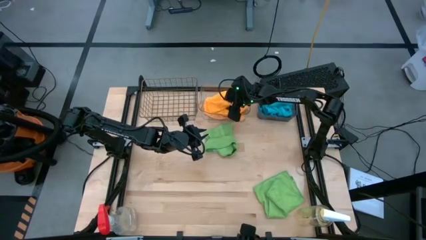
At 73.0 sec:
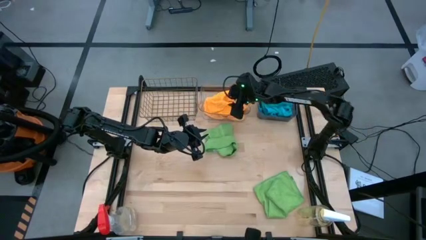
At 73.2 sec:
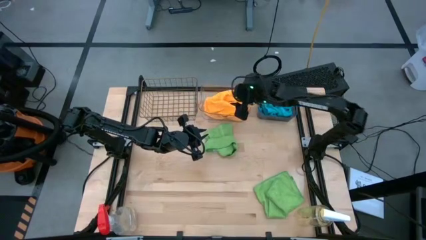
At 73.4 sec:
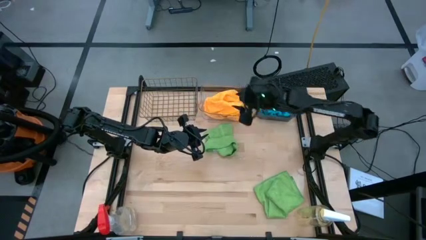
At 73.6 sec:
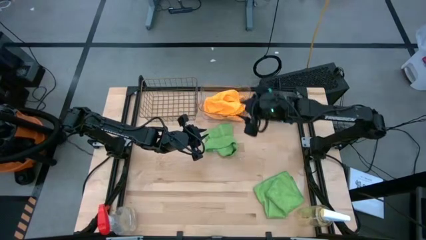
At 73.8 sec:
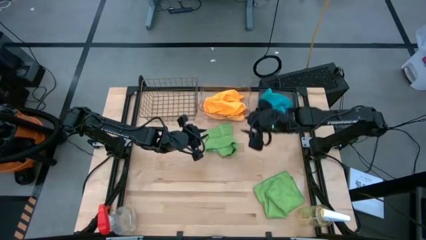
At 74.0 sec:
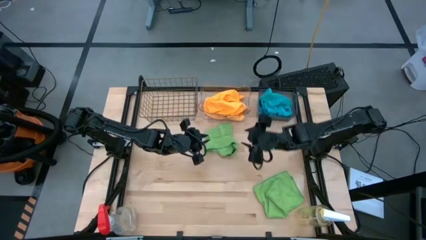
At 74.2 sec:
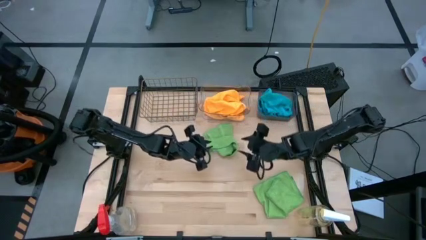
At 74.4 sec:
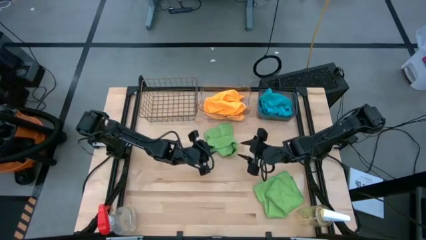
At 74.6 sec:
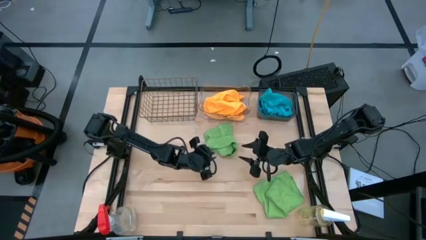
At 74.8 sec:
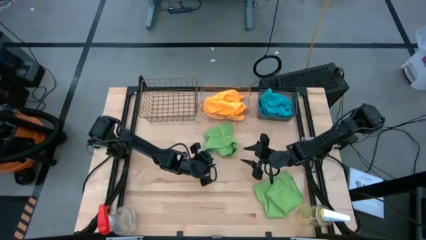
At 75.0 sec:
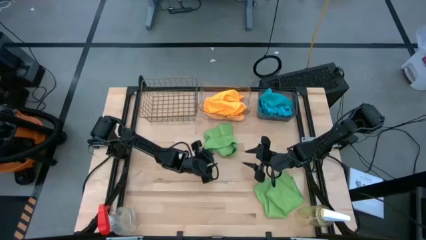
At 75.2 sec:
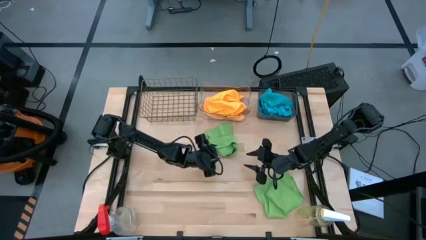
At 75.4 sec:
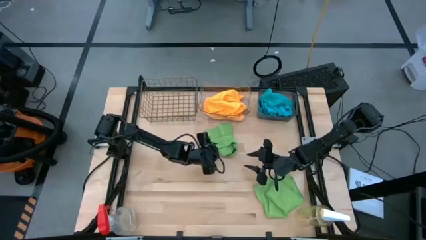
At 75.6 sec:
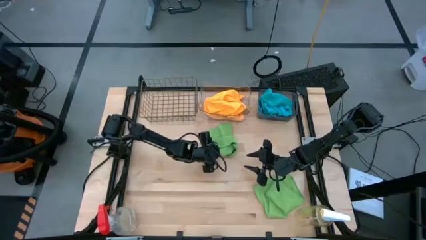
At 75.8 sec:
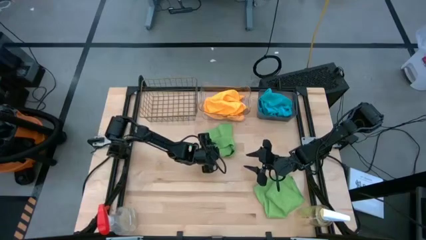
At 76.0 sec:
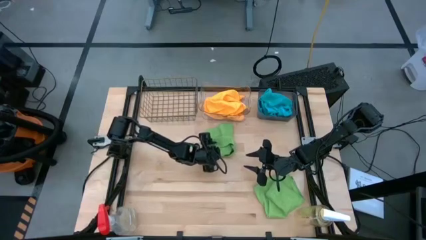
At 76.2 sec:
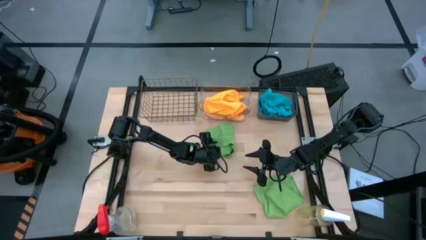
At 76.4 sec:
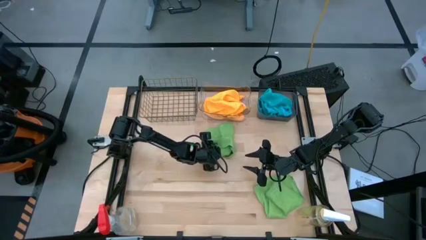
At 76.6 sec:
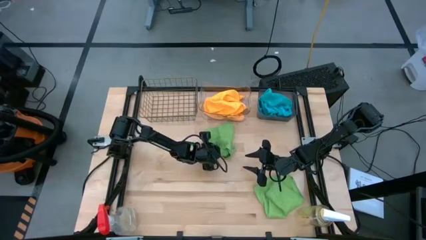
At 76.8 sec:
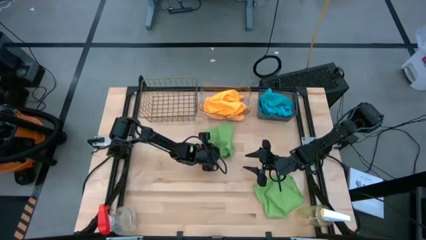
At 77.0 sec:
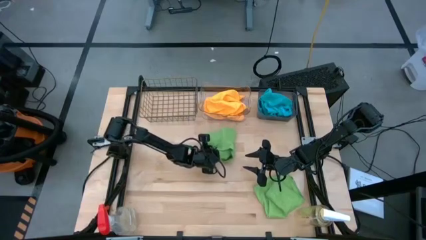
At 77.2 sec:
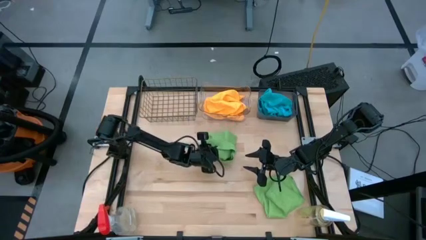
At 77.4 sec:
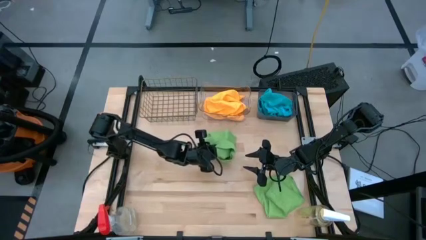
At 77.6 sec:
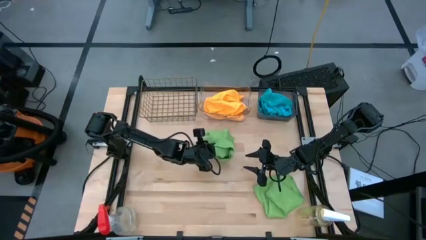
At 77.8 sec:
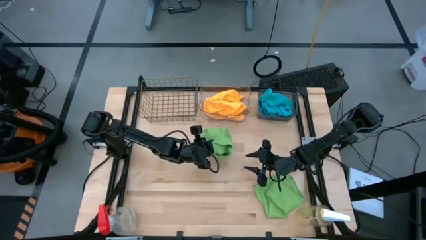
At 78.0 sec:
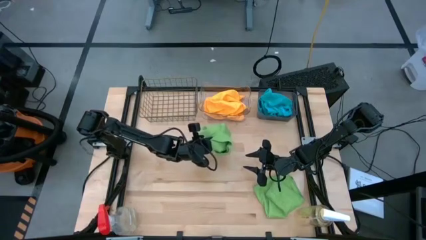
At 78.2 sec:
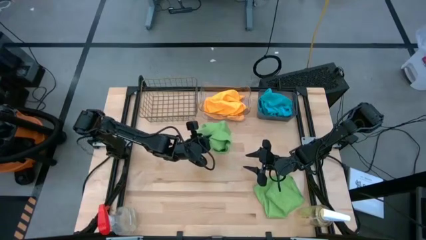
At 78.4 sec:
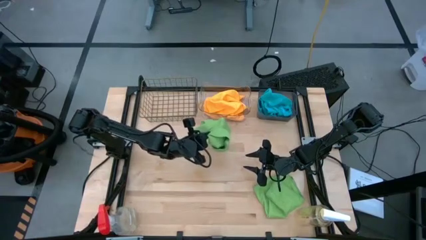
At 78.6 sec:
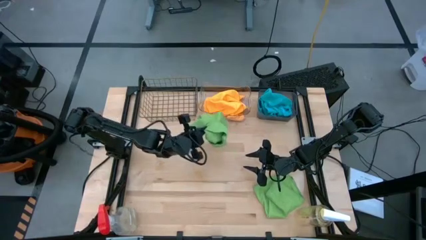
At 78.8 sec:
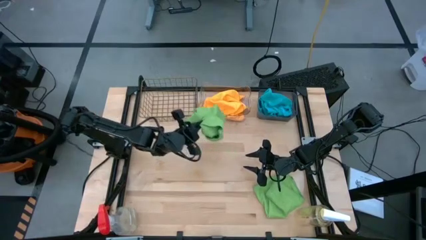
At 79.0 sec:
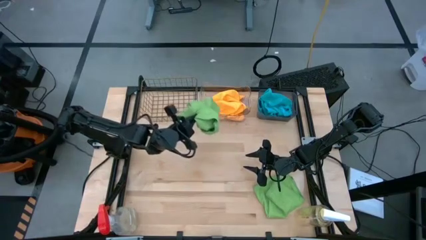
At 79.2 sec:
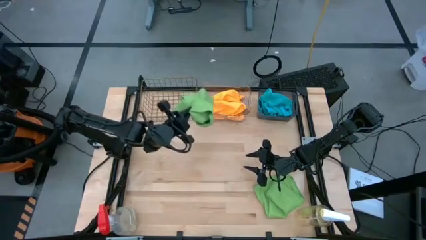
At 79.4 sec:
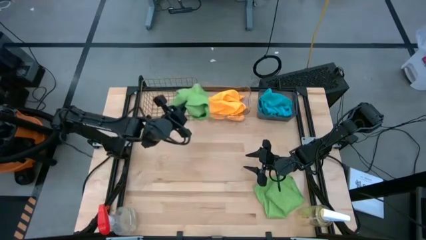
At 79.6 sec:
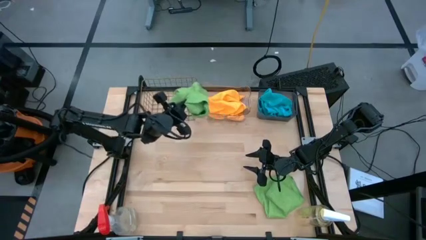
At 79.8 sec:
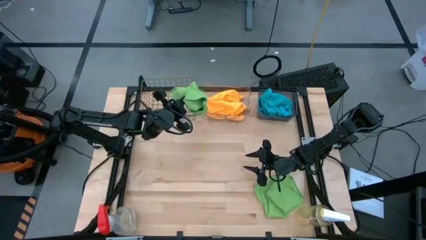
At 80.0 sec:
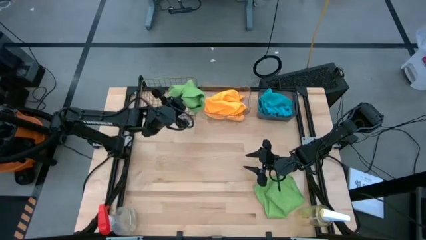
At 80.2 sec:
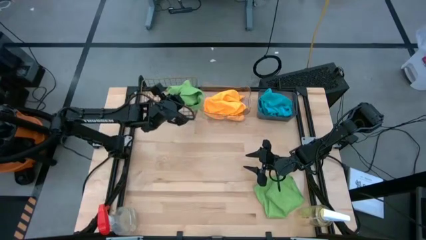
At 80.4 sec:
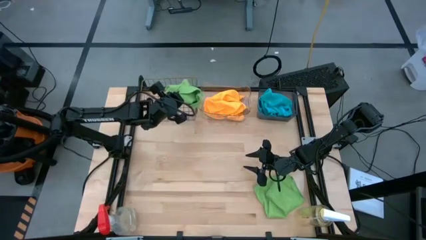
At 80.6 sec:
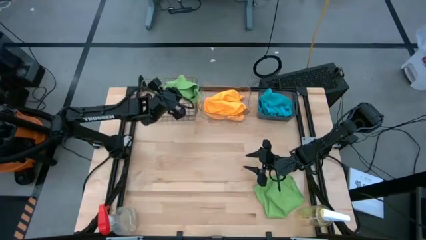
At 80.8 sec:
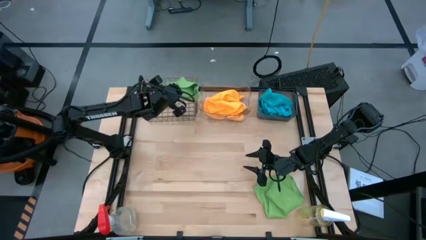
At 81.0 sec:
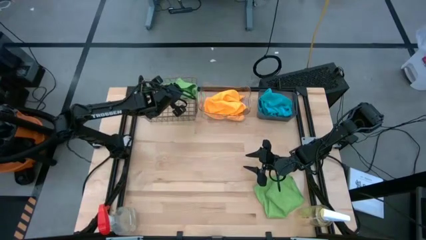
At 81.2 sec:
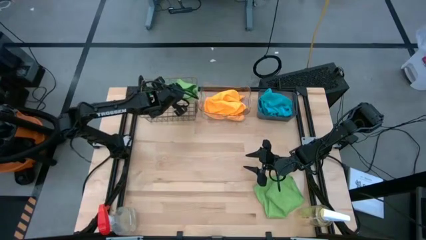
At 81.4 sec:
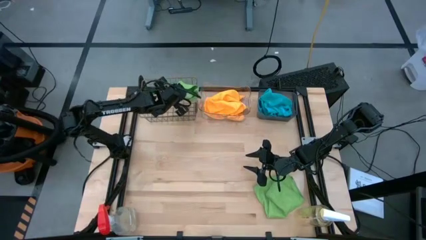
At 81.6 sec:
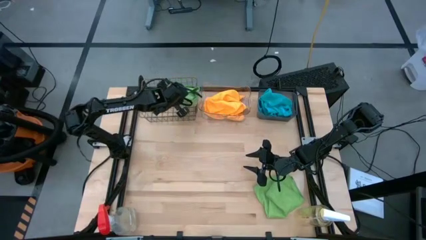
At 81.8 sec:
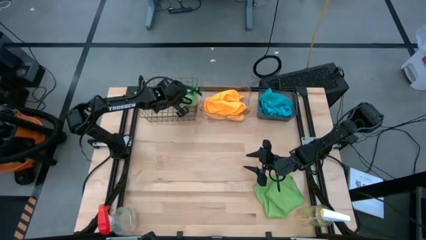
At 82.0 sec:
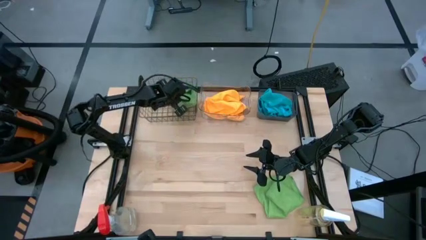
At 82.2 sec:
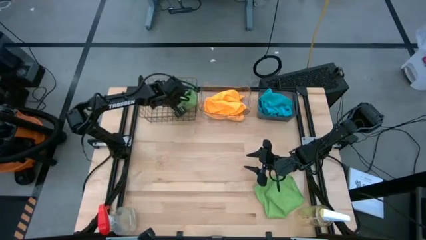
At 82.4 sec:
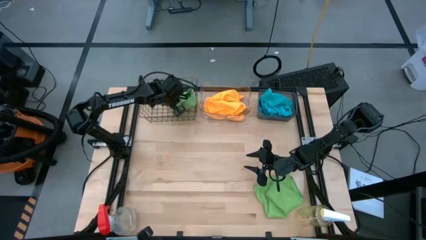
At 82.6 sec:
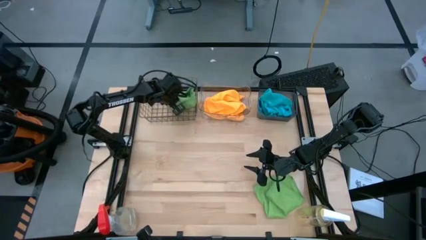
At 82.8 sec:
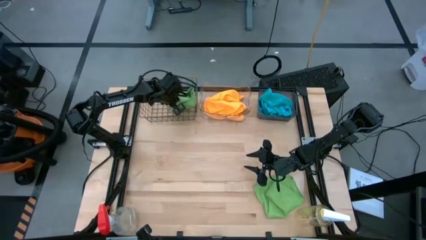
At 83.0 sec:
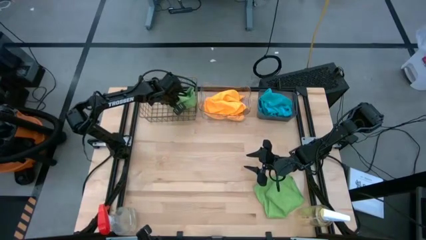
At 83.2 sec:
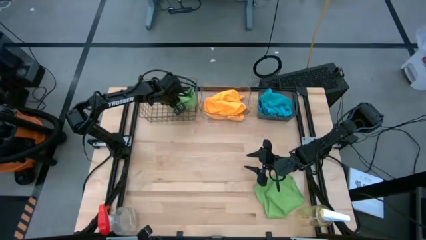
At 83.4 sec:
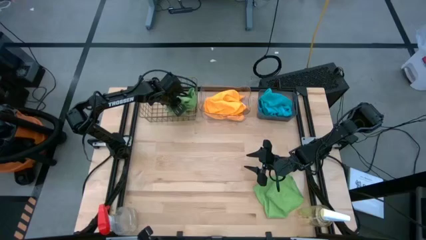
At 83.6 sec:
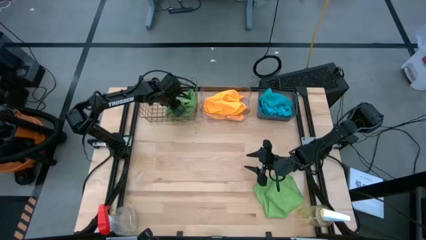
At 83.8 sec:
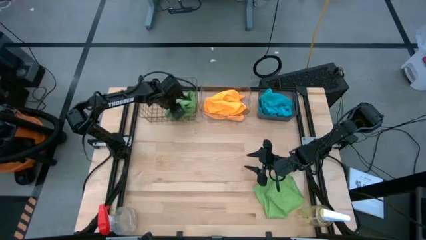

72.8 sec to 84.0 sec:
Task: Sort microfiber towel by color & place in baskets
Put the top green microfiber towel into the wire basket
